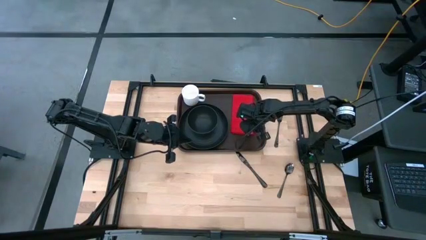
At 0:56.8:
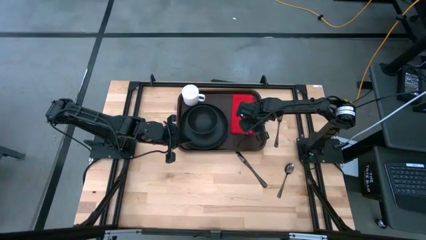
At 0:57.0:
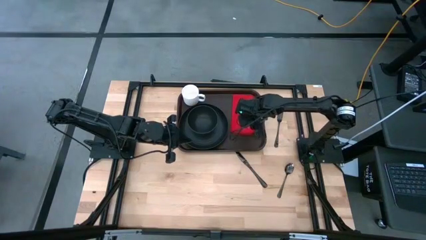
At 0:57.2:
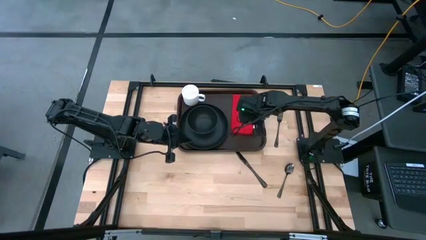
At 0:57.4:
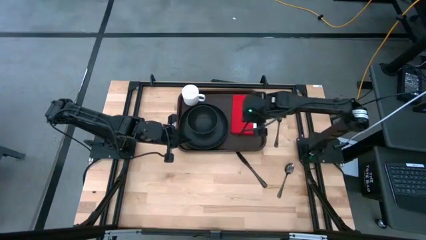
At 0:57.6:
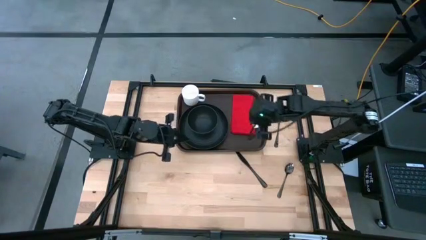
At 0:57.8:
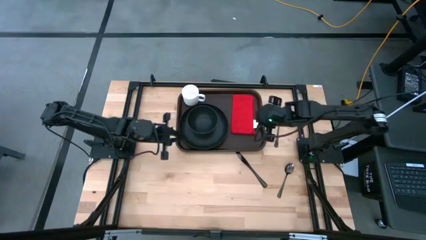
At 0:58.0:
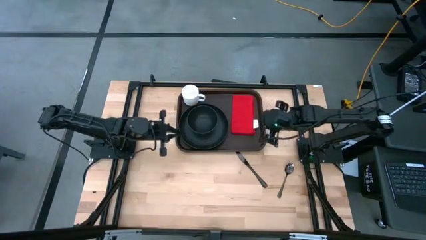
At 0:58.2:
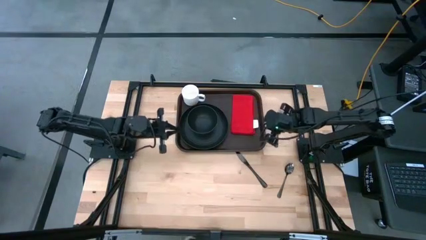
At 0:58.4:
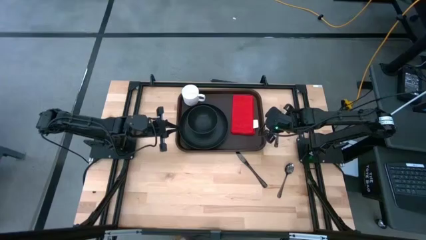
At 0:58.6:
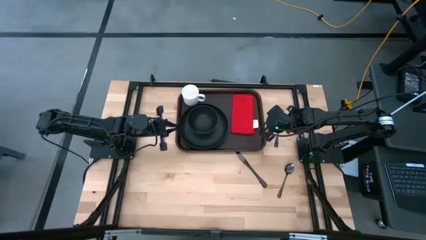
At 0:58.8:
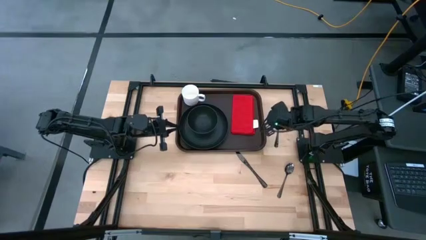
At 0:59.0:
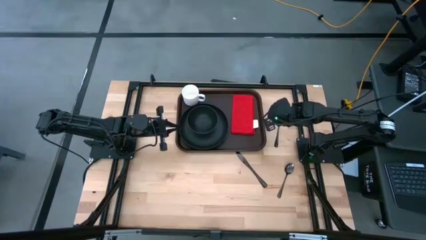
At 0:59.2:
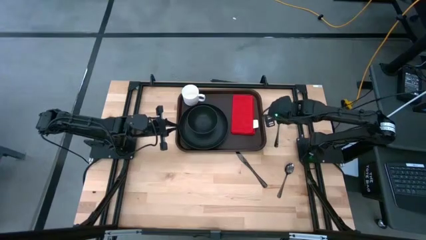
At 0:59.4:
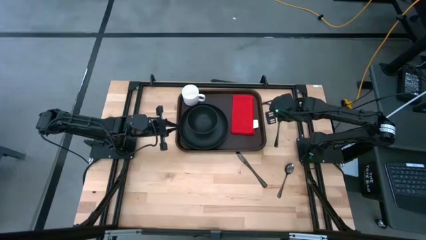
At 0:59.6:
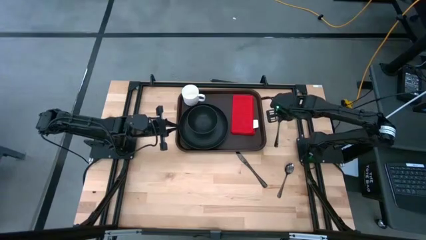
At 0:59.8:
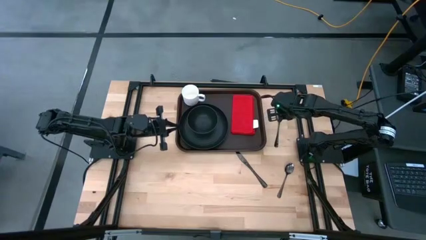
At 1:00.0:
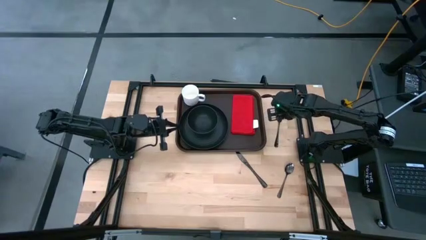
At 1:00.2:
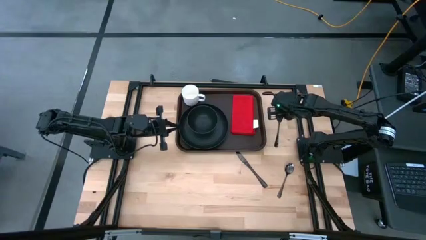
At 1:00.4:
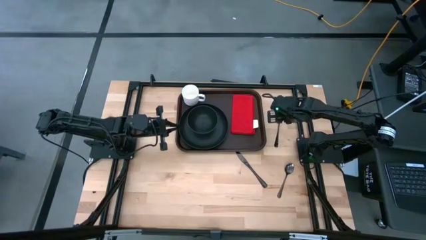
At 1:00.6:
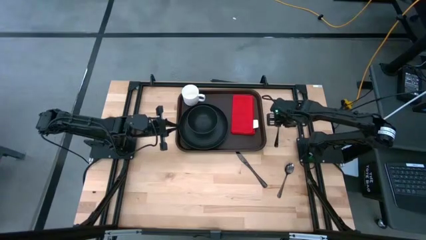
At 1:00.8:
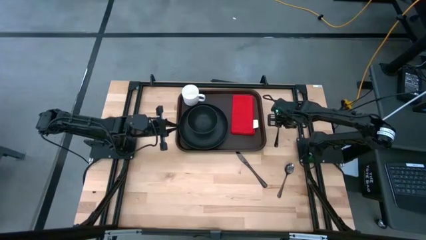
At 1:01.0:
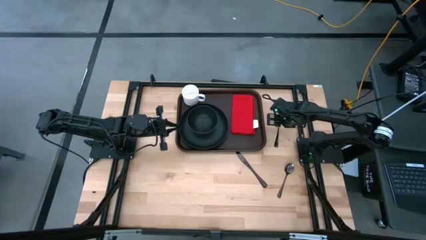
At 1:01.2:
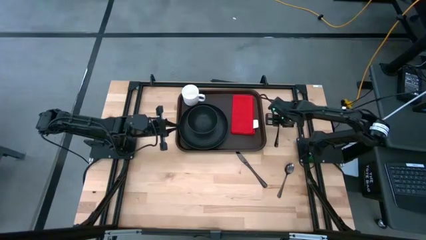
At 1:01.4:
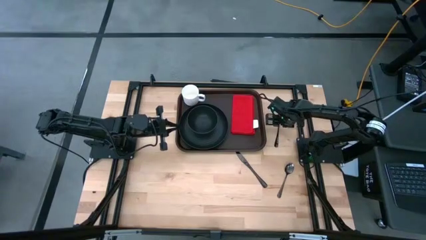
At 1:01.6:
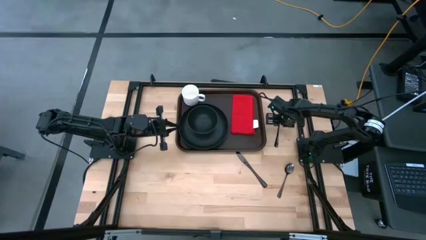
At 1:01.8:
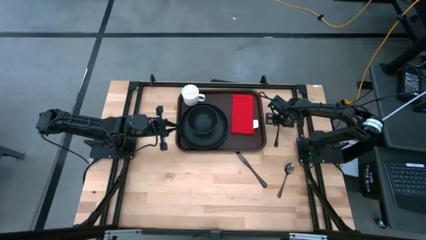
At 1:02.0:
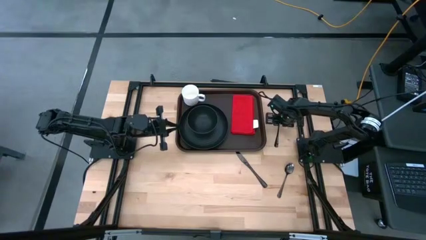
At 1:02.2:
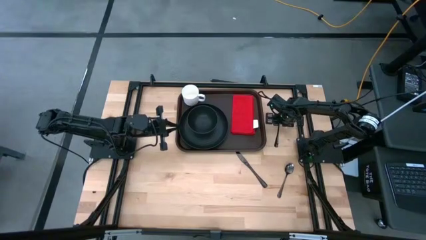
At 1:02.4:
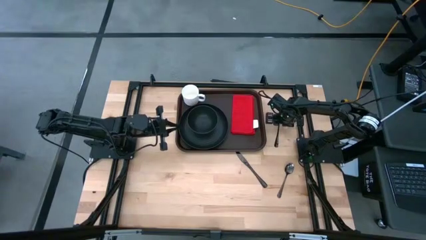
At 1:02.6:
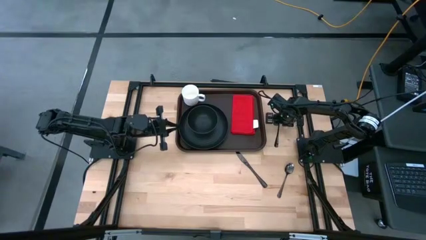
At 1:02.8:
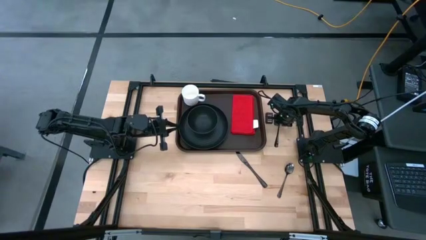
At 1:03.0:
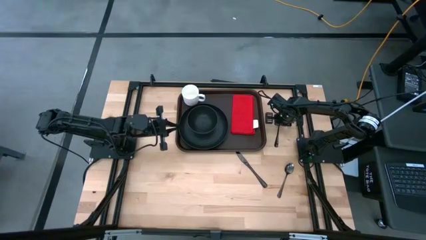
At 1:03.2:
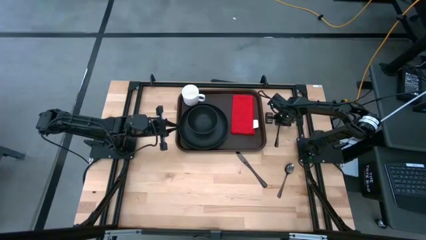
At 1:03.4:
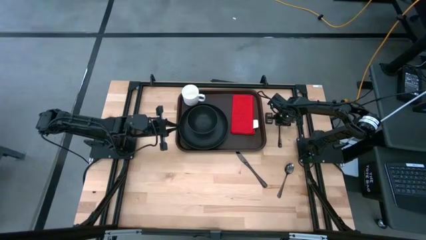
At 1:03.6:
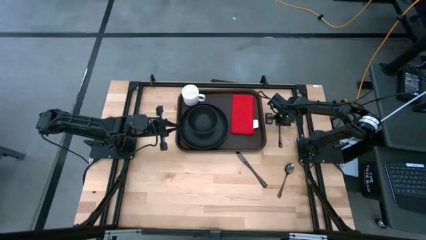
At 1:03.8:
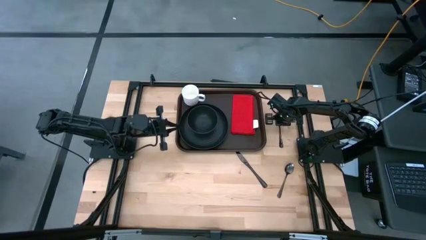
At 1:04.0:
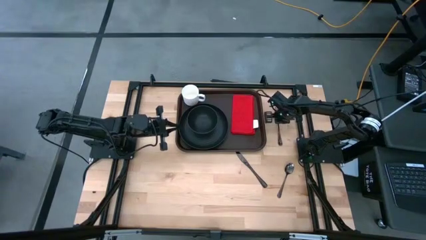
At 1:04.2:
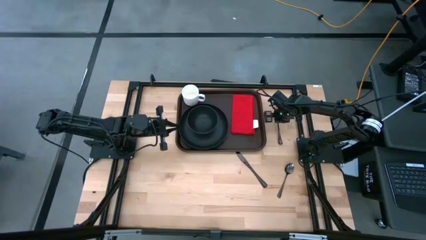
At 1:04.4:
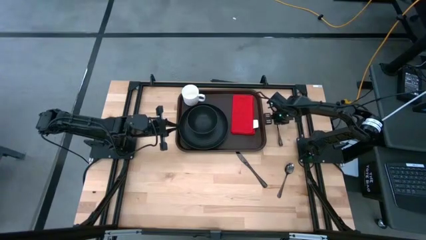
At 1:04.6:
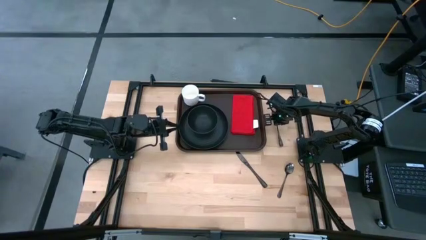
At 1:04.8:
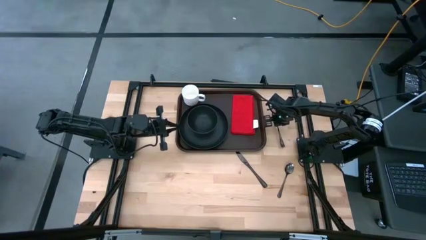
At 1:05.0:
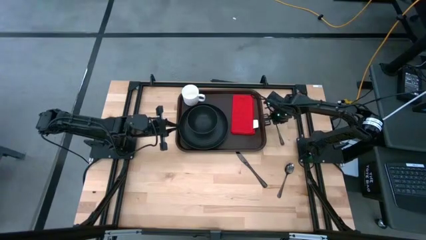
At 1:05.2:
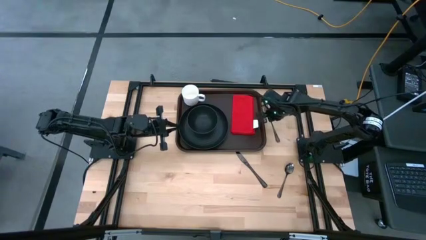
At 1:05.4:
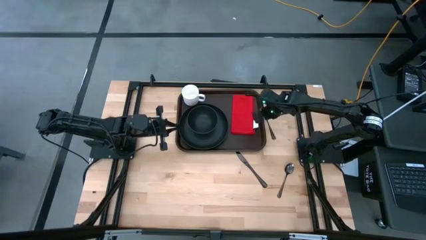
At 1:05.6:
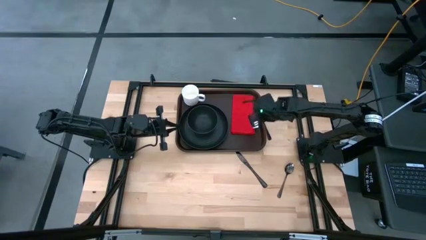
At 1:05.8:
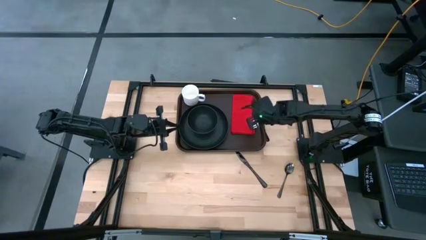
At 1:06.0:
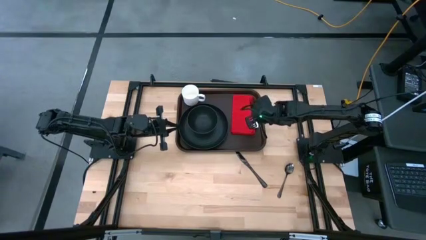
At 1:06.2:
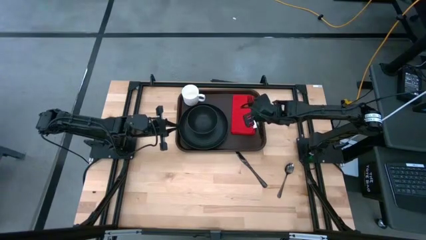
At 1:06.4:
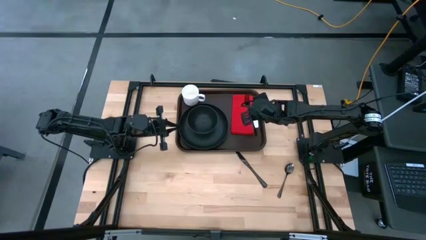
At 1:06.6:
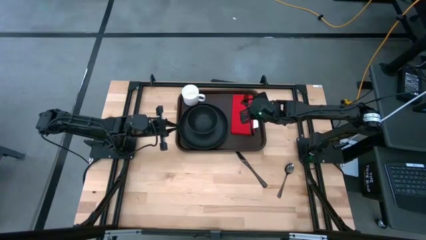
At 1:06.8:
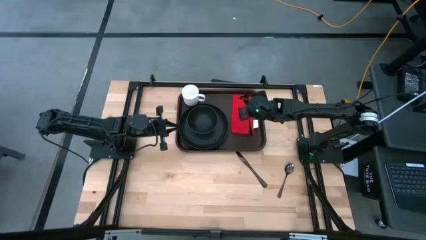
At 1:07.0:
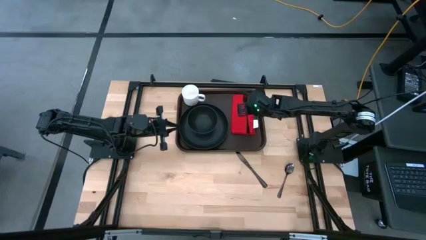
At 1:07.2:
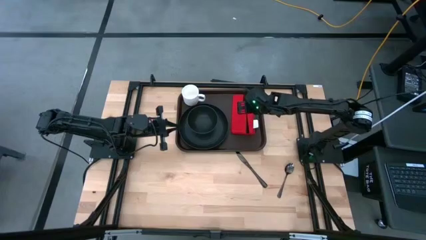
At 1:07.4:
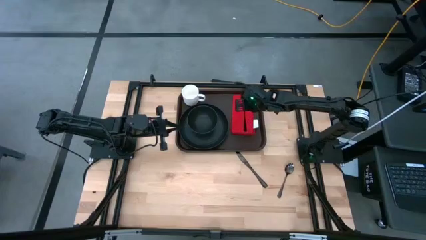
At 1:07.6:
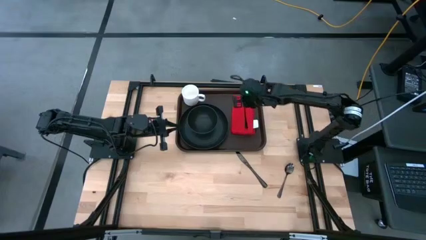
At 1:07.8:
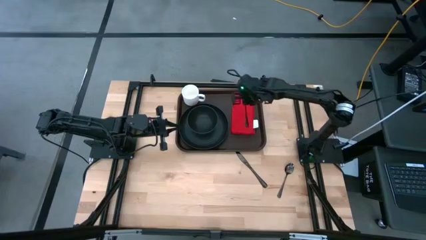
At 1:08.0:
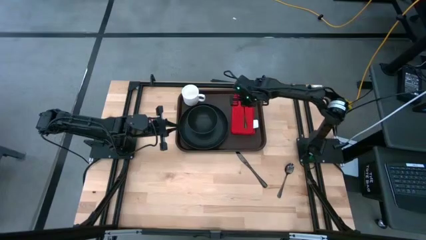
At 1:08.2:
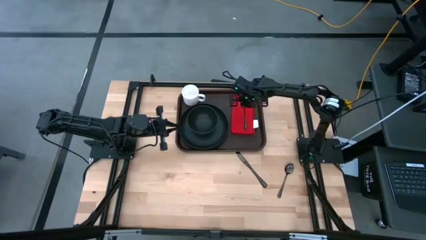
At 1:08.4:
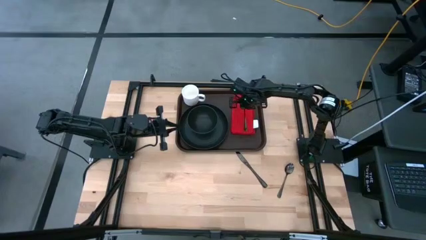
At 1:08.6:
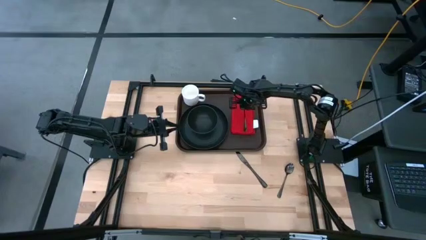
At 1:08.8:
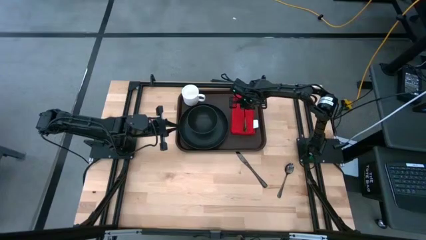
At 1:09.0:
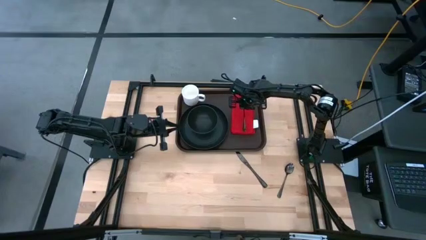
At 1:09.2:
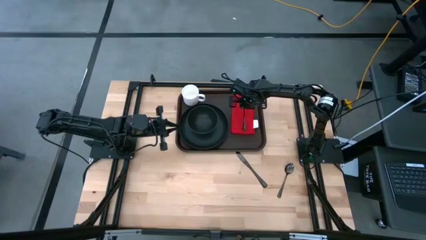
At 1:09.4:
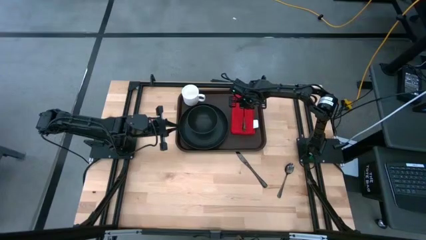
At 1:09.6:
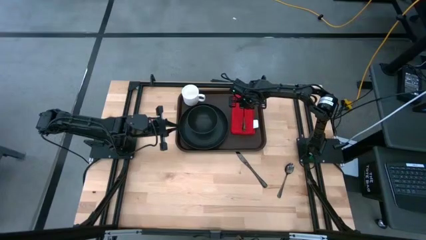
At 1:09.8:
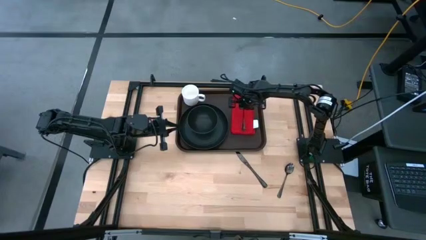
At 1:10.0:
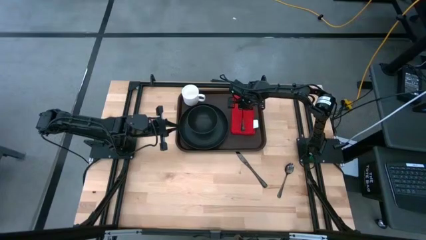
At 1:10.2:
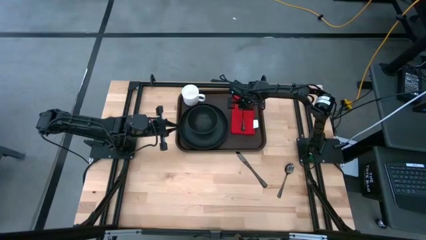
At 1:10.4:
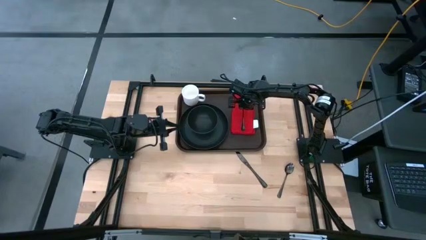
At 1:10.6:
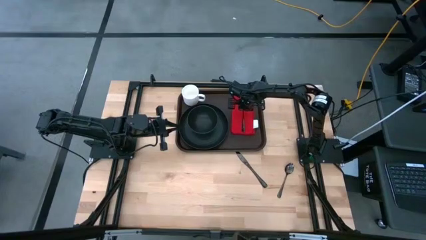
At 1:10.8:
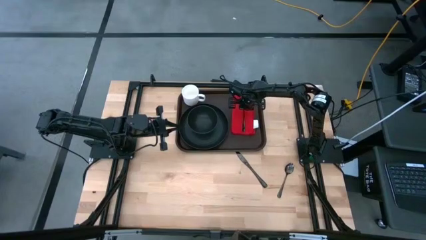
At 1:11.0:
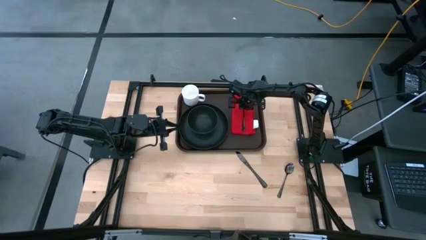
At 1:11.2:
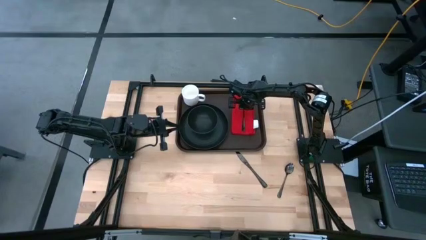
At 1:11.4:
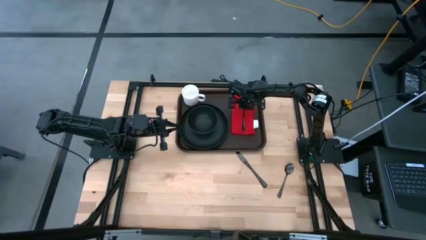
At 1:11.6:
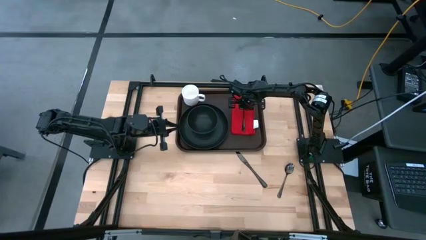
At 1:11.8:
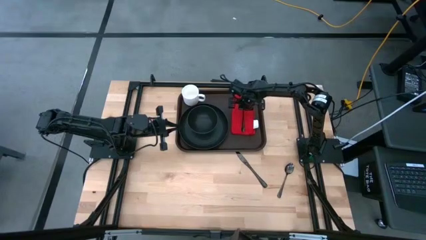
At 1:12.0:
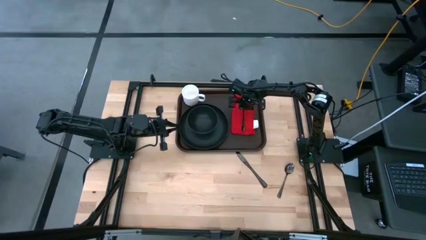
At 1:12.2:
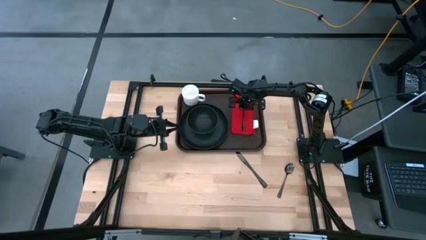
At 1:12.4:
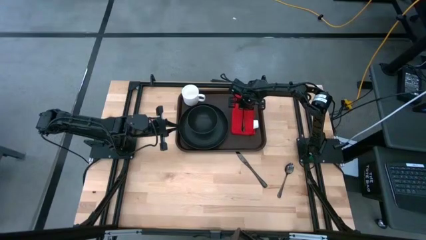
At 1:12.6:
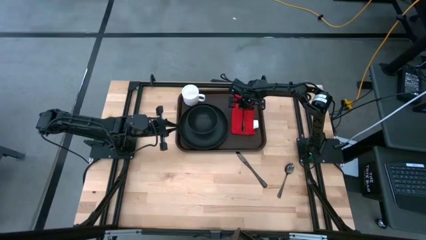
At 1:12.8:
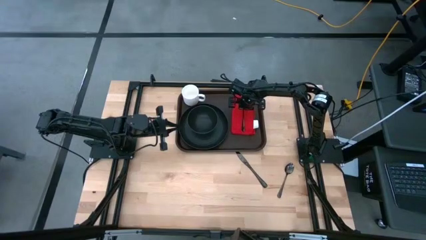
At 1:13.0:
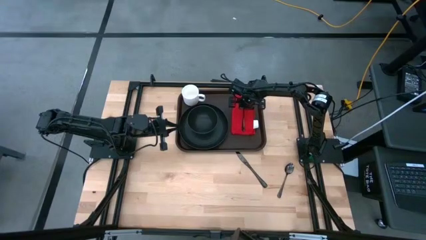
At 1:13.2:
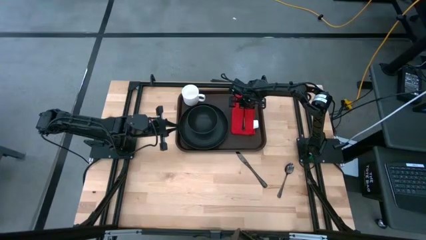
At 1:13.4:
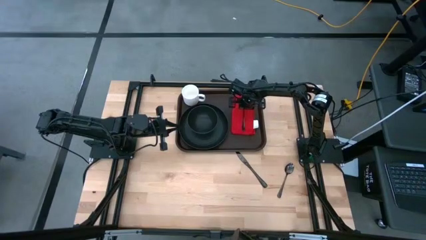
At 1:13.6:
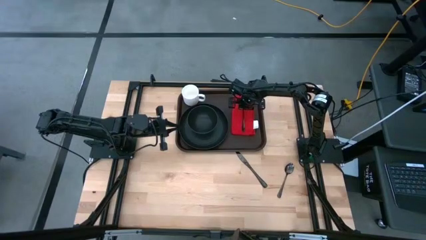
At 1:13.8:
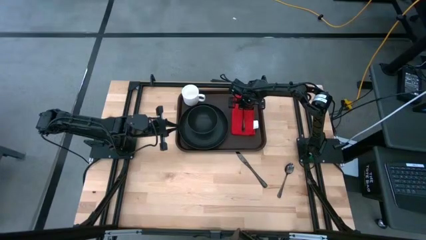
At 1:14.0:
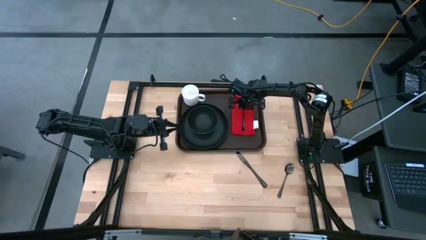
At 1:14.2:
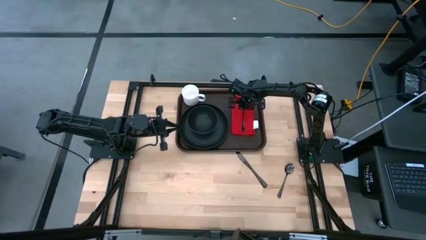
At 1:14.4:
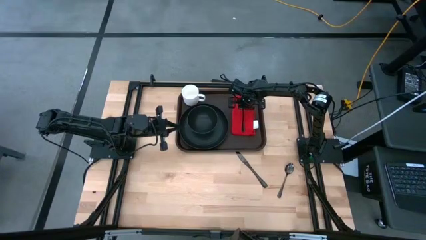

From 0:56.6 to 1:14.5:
Task: Set up tray
Put the black fork on the red napkin
